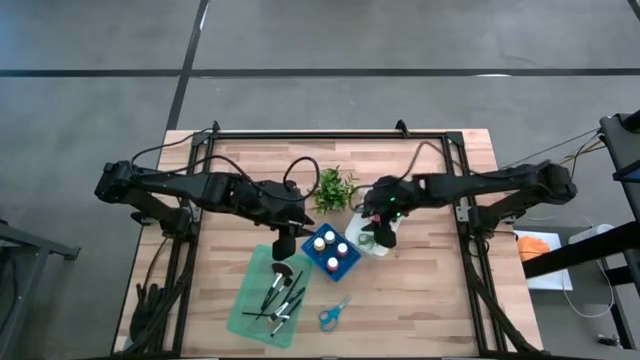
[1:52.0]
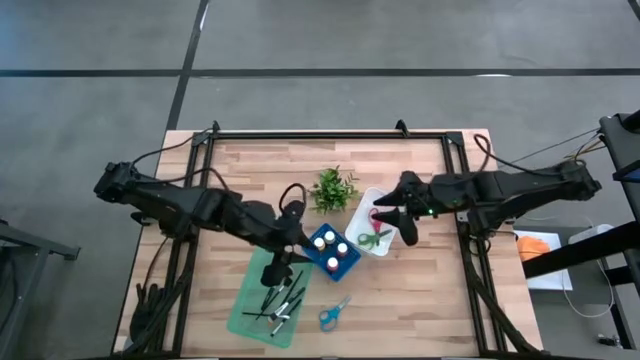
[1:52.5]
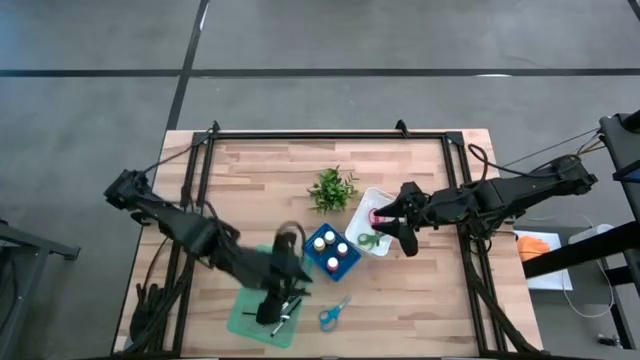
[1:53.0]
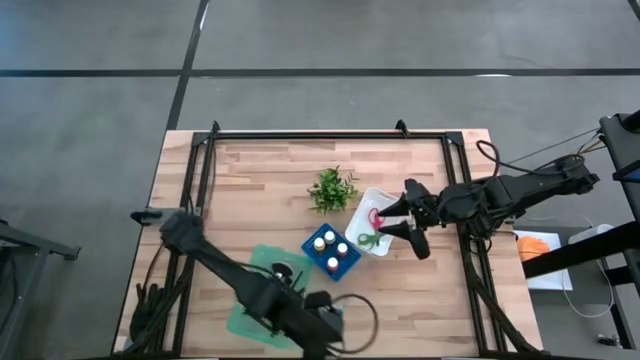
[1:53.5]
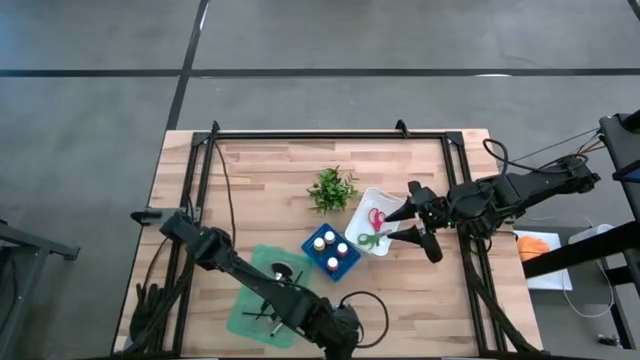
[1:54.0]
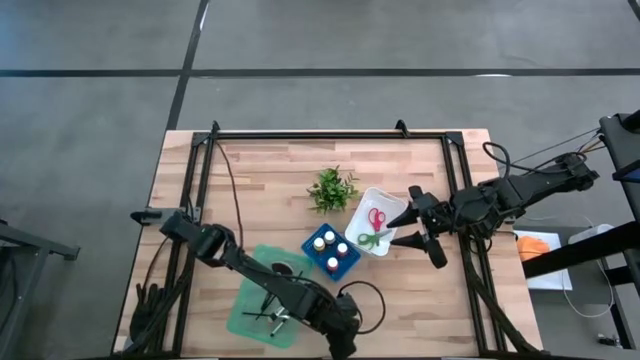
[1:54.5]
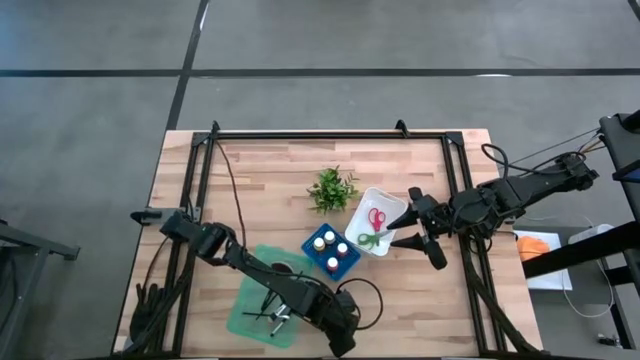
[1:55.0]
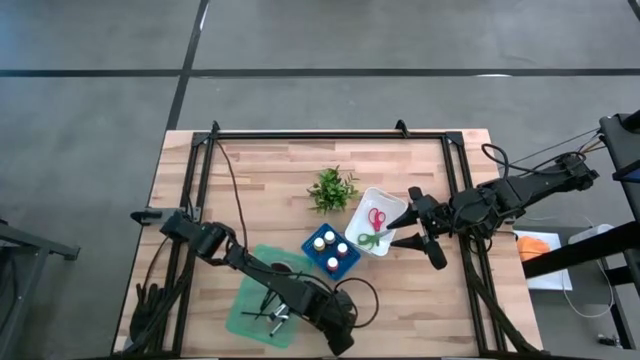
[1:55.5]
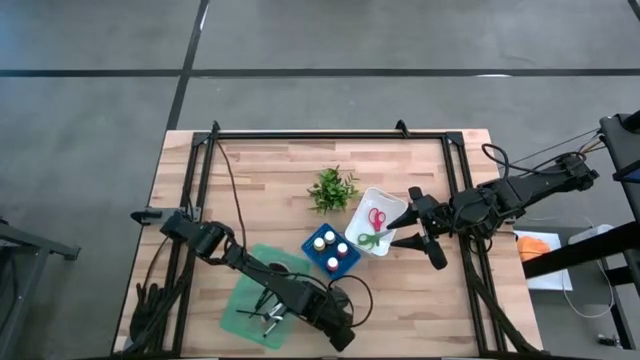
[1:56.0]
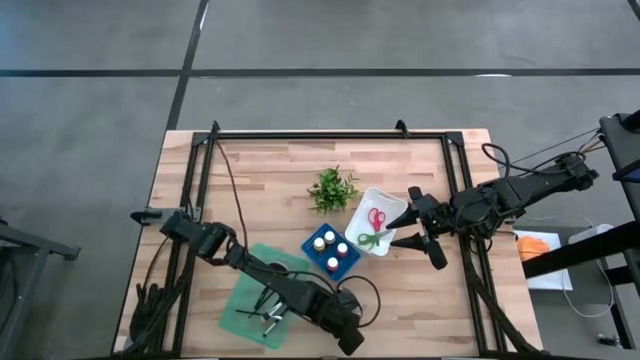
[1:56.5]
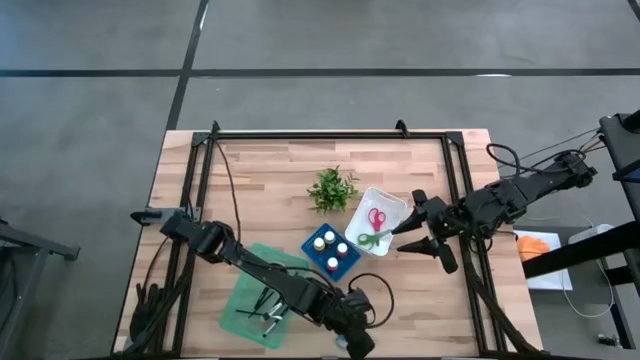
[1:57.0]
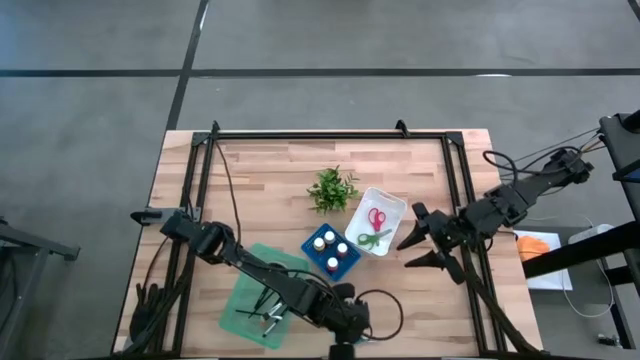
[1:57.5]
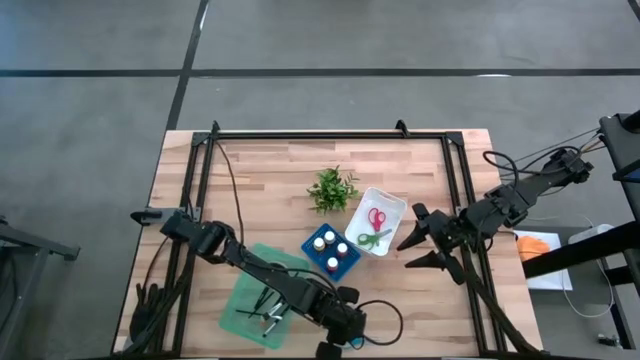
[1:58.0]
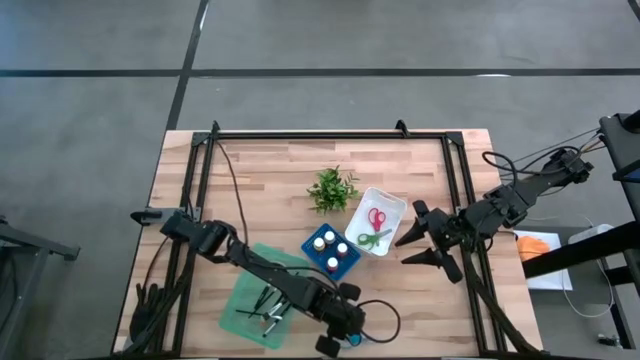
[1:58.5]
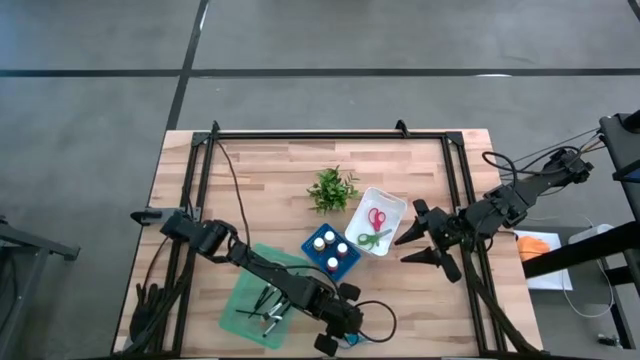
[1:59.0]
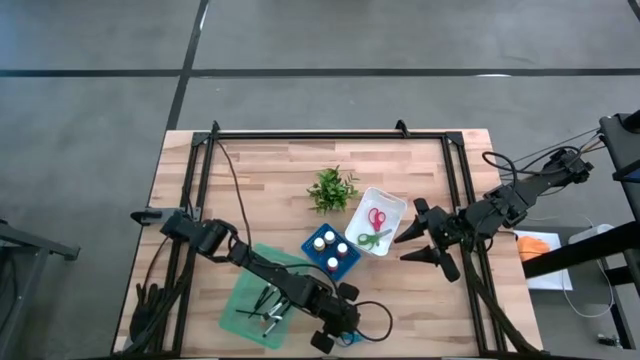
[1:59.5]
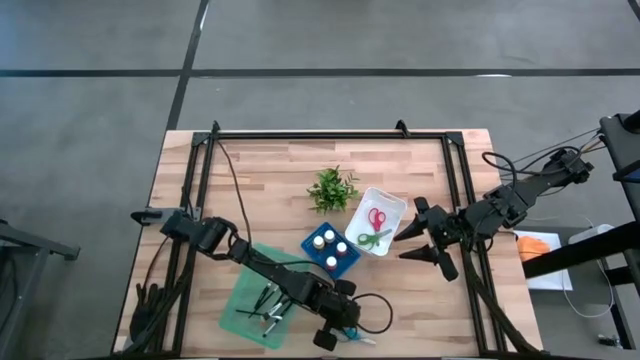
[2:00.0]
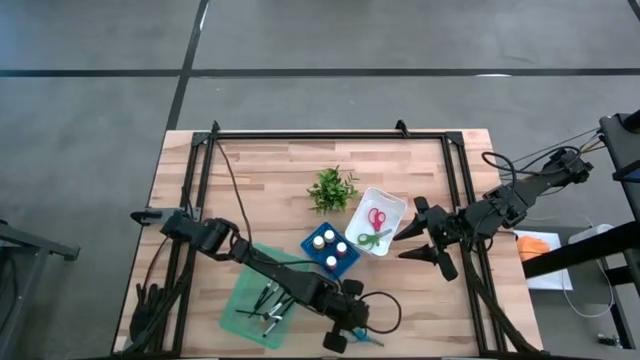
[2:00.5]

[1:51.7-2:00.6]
Task: Pick & Place Paint Supplies
Put the blue scissors into the white bin

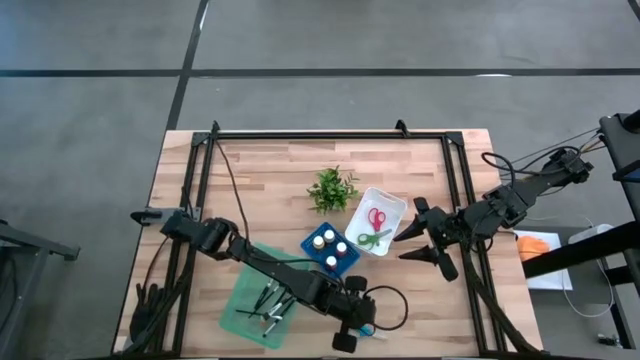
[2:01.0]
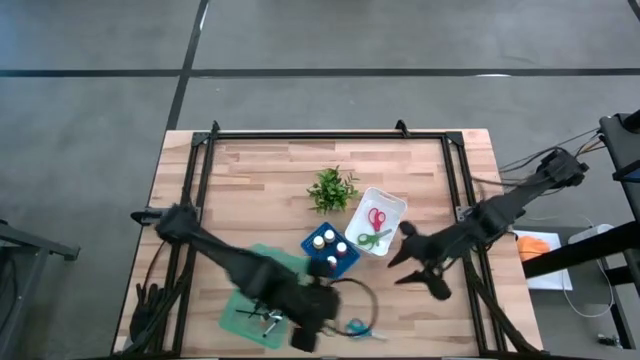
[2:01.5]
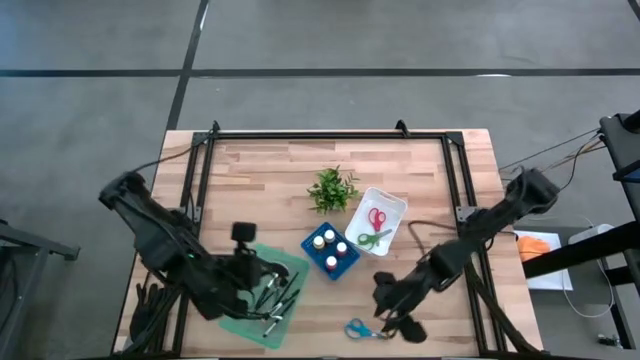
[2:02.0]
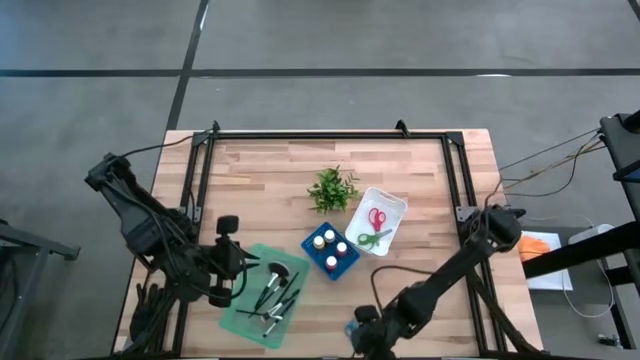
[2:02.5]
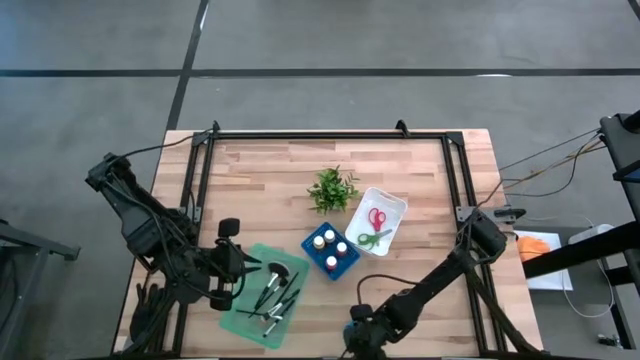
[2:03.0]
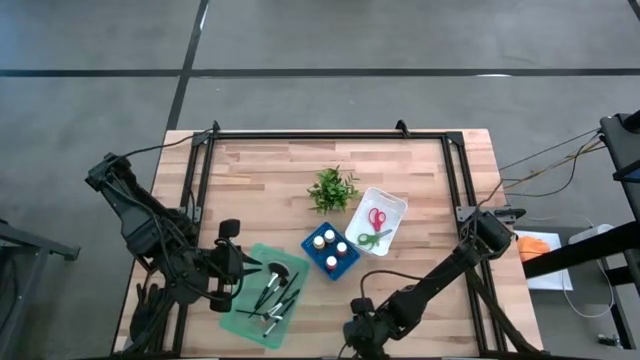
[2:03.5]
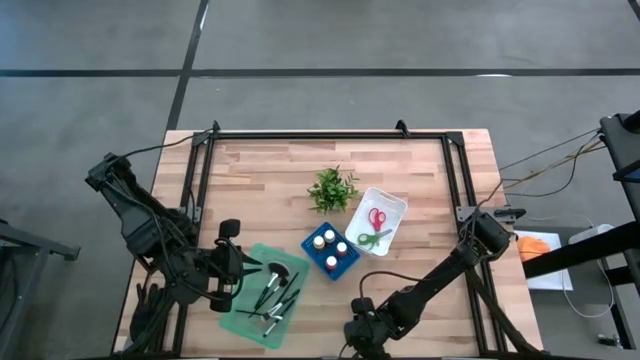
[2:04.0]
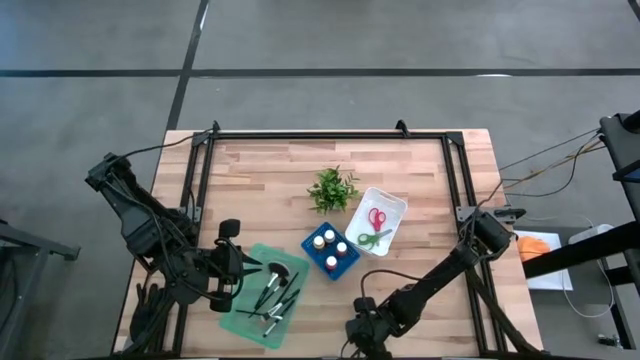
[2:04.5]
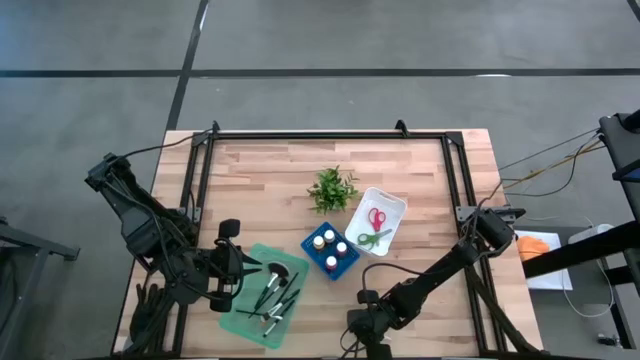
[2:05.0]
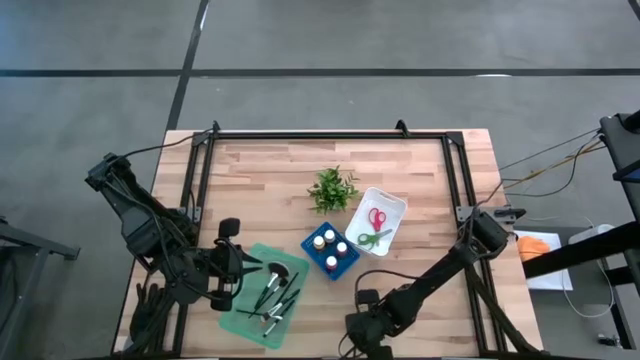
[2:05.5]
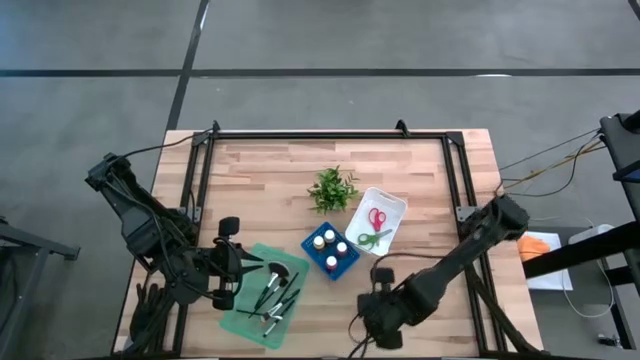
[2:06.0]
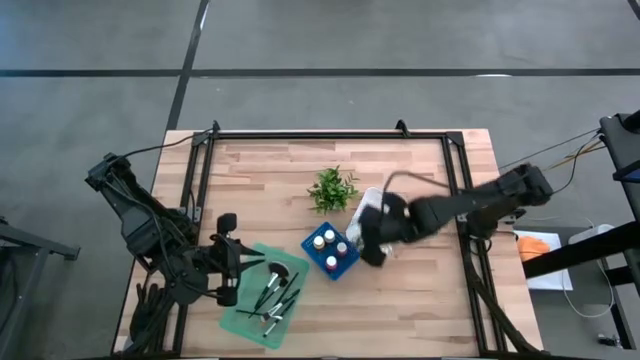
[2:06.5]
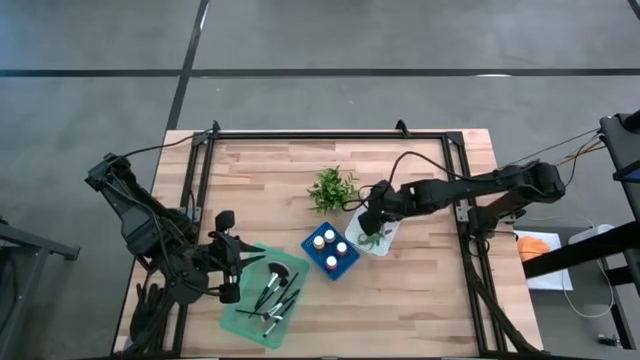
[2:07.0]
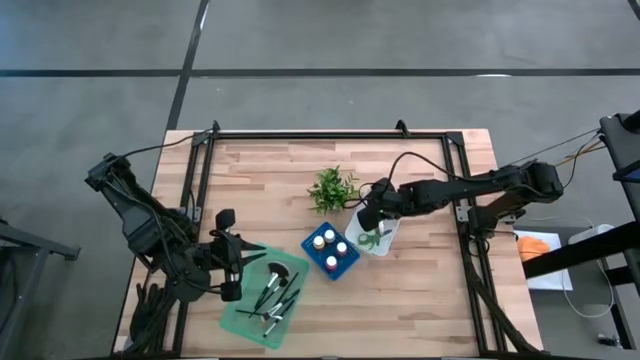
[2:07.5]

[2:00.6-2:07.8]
Put the blue scissors into the white bin

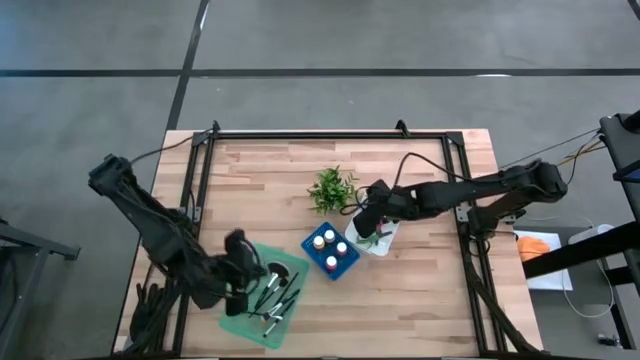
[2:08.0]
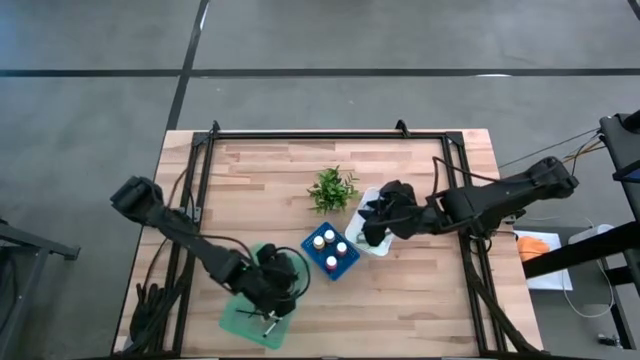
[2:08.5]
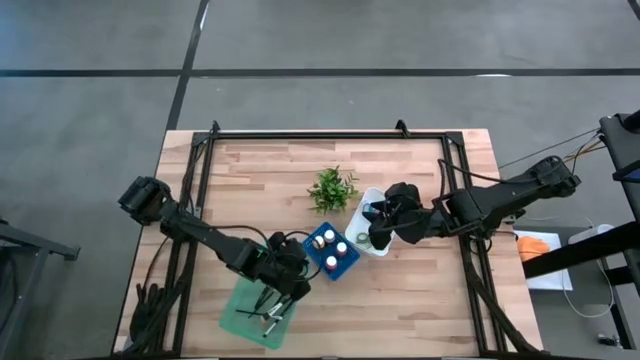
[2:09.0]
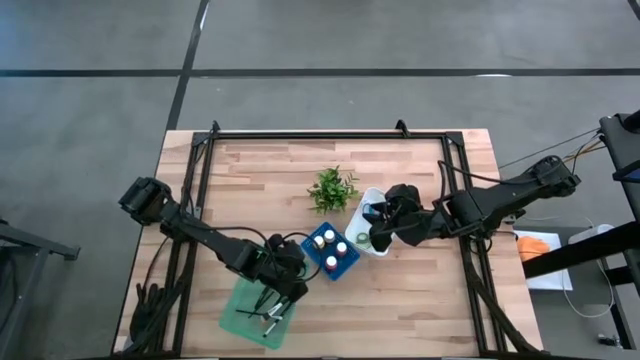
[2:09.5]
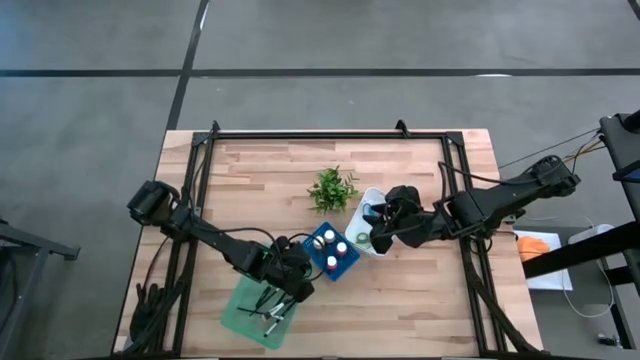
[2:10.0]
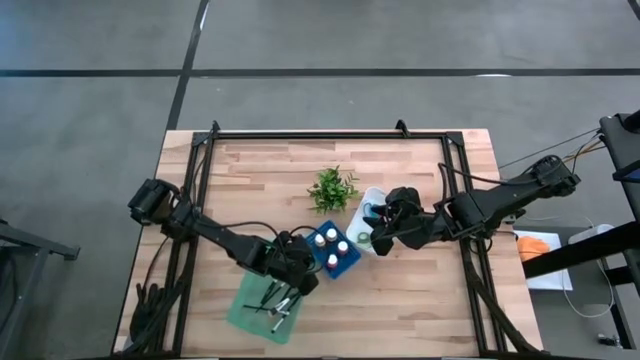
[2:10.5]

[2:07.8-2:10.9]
Adjust the green bin

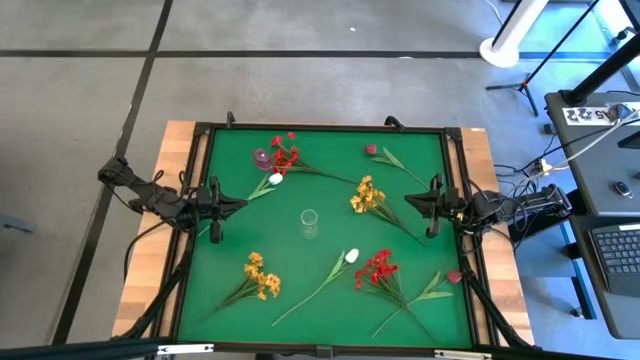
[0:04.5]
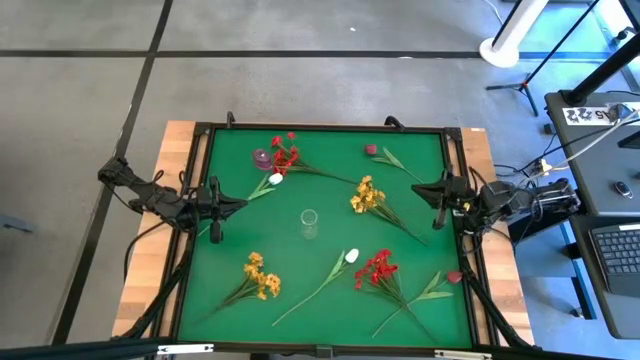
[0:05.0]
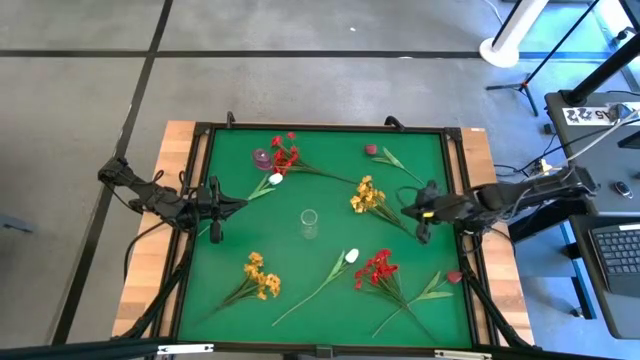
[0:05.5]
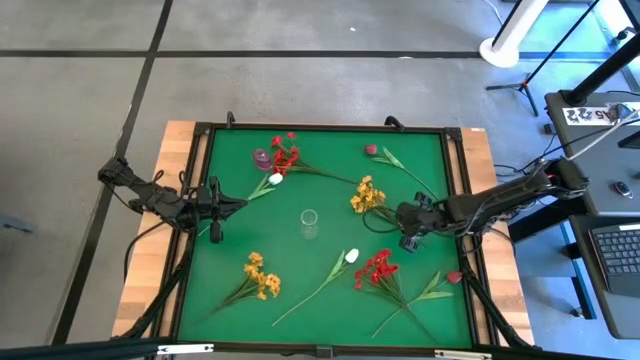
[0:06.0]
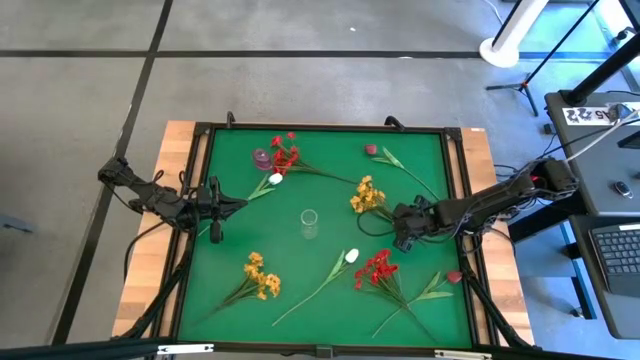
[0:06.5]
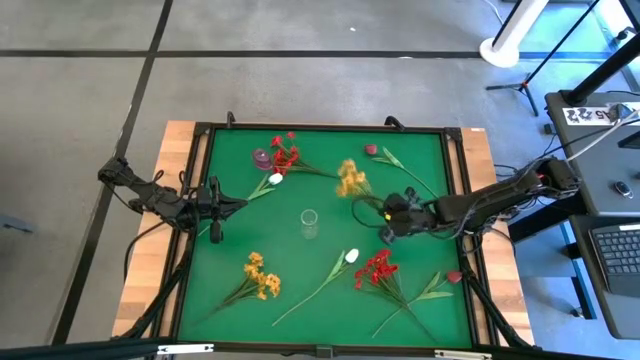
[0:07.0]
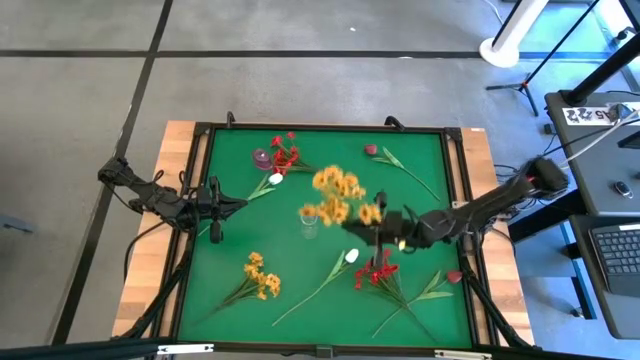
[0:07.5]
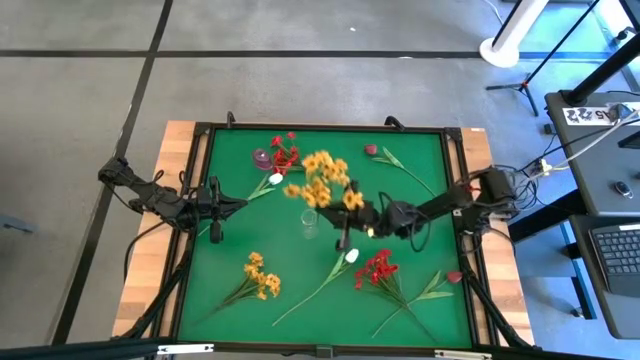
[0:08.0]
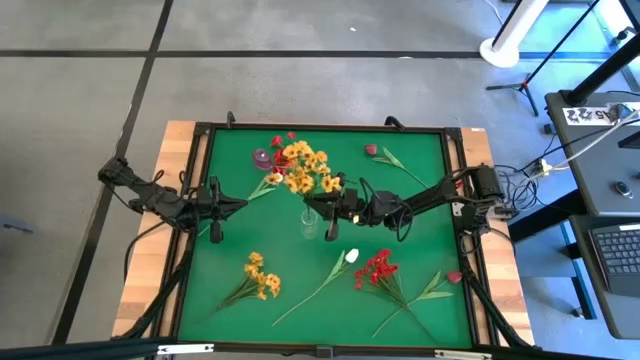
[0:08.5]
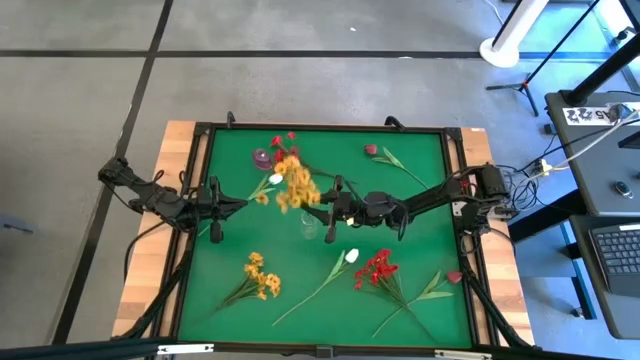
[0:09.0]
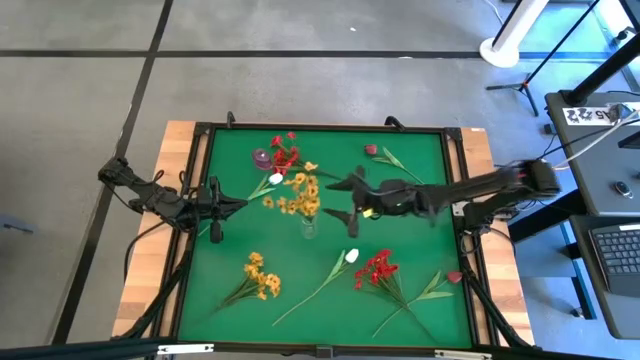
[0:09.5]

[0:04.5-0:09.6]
Task: Sort flowers into vase by color
Put the right yellow flowers into the transparent vase
